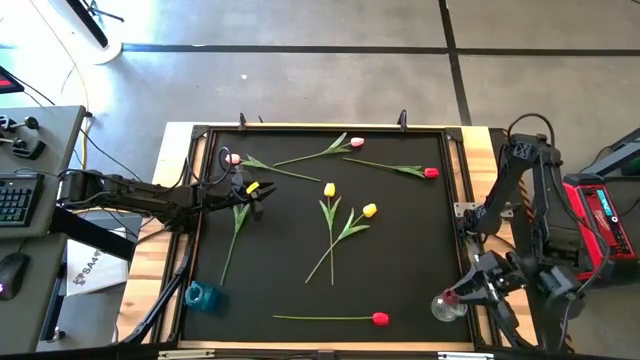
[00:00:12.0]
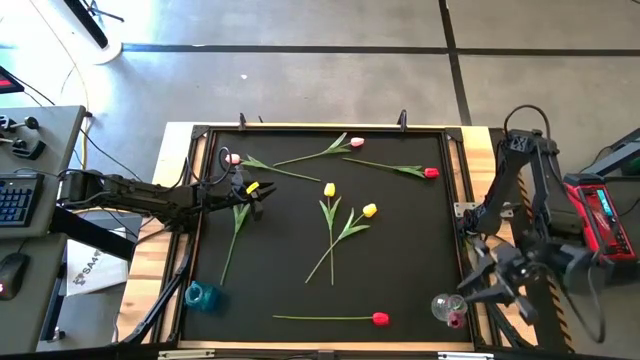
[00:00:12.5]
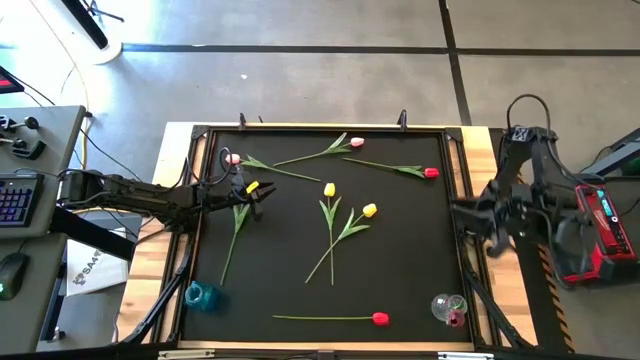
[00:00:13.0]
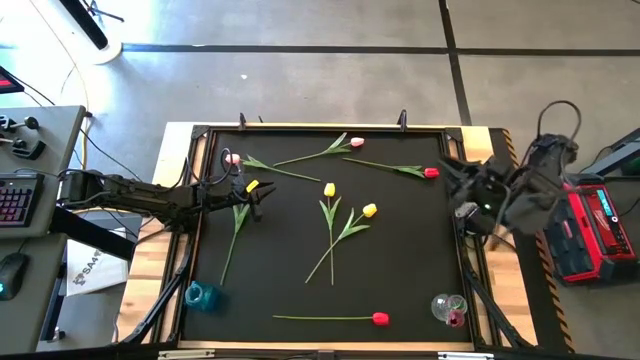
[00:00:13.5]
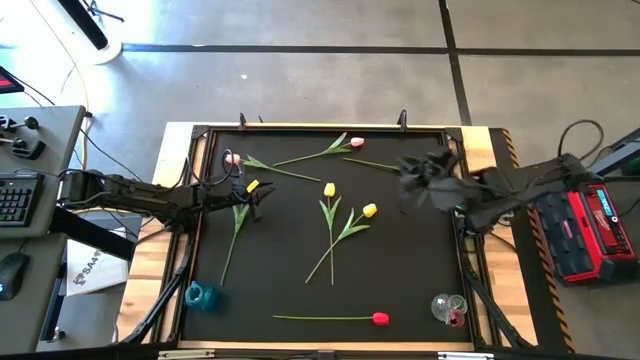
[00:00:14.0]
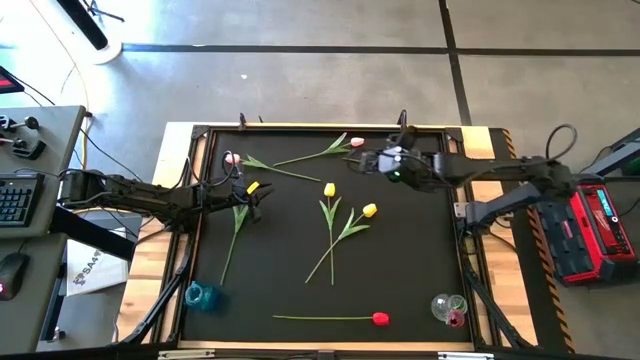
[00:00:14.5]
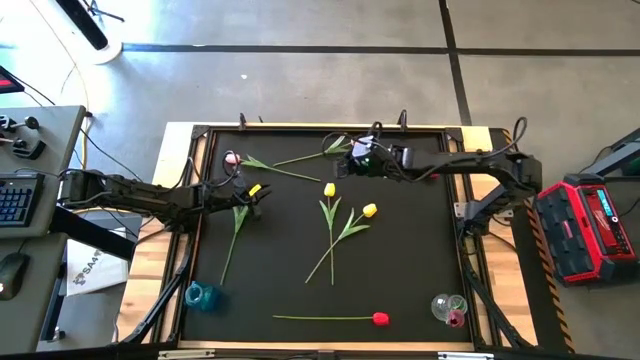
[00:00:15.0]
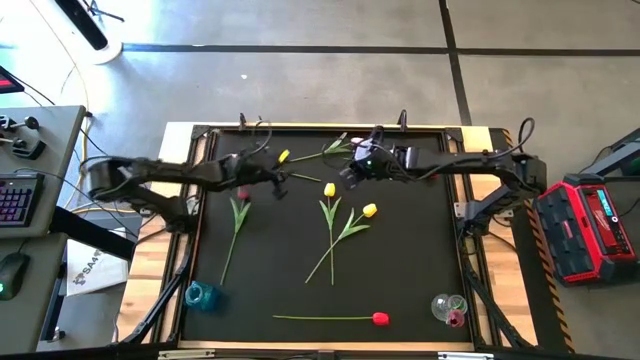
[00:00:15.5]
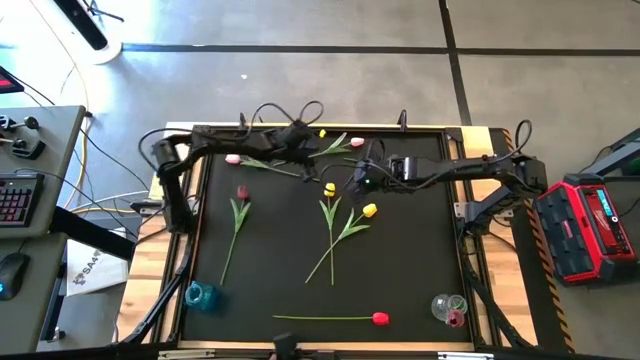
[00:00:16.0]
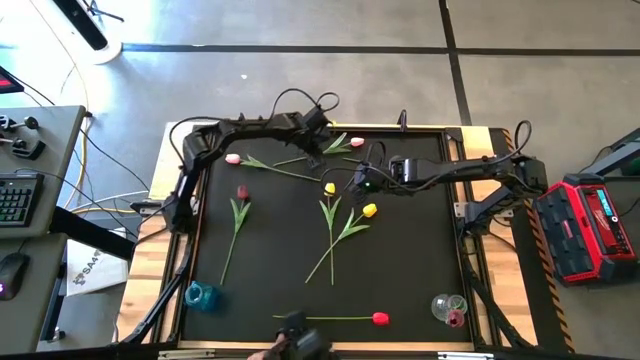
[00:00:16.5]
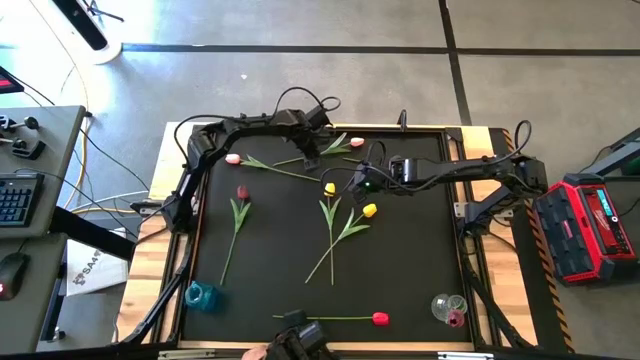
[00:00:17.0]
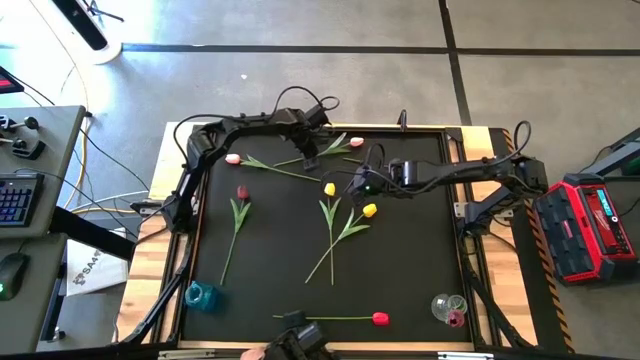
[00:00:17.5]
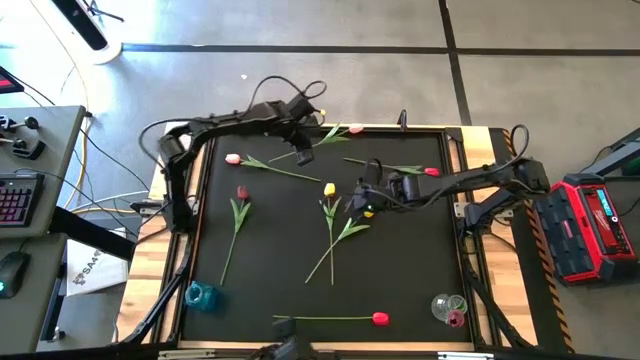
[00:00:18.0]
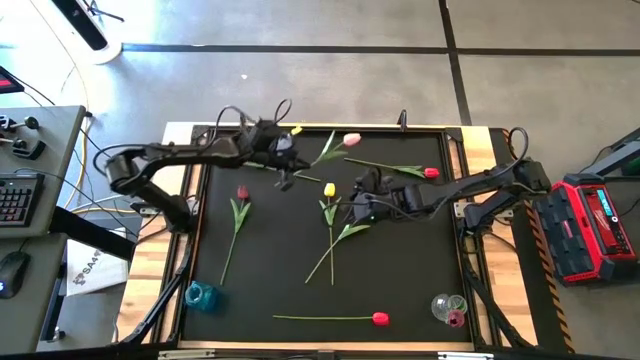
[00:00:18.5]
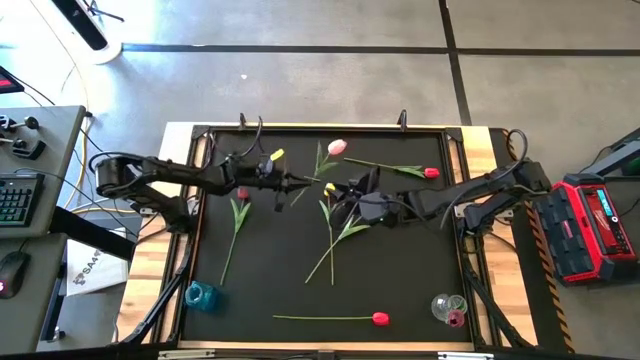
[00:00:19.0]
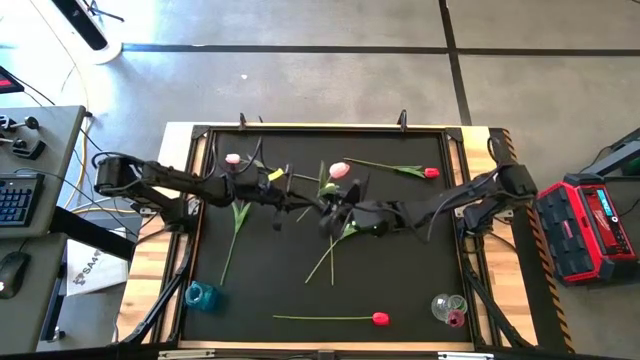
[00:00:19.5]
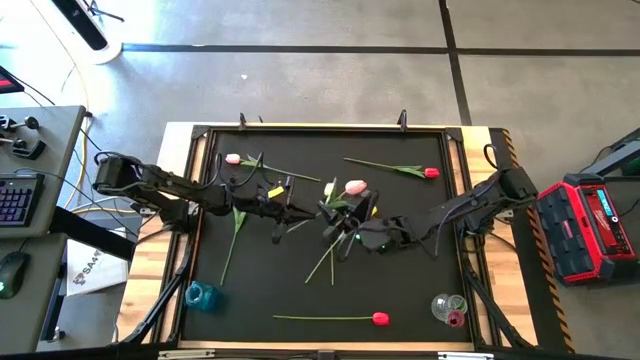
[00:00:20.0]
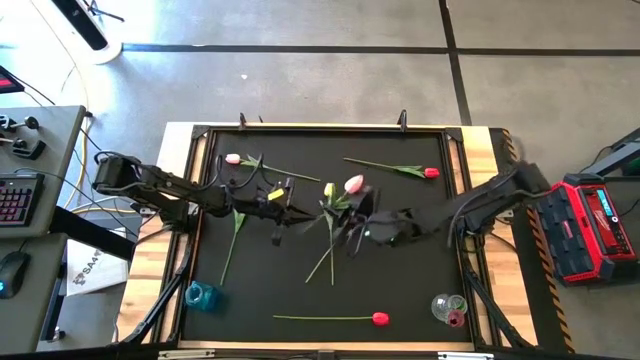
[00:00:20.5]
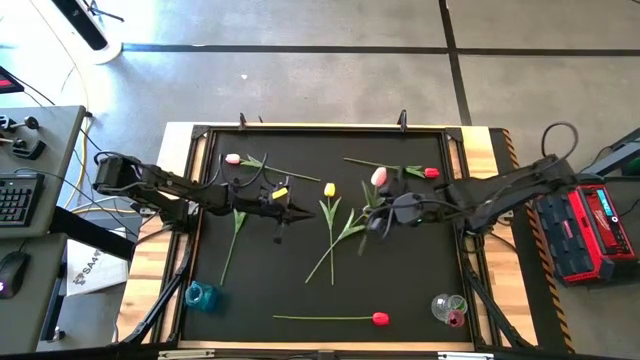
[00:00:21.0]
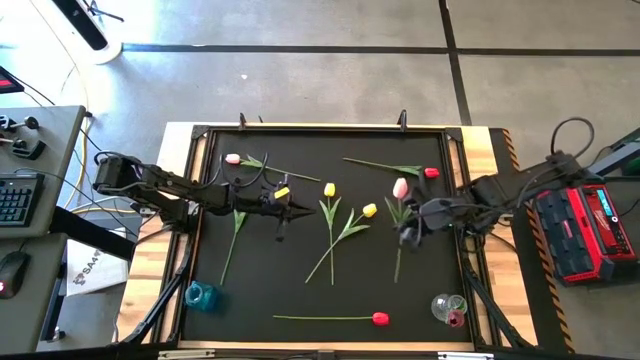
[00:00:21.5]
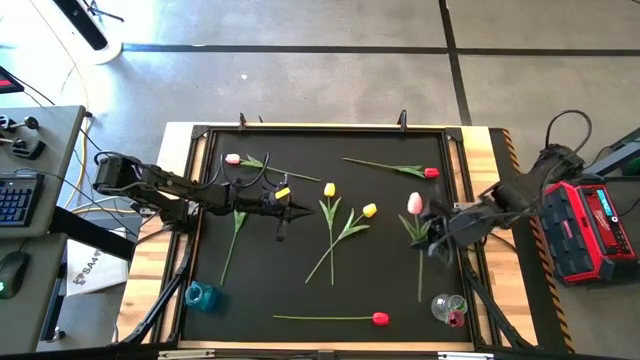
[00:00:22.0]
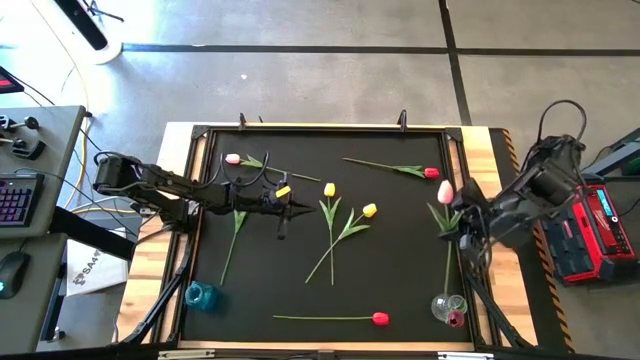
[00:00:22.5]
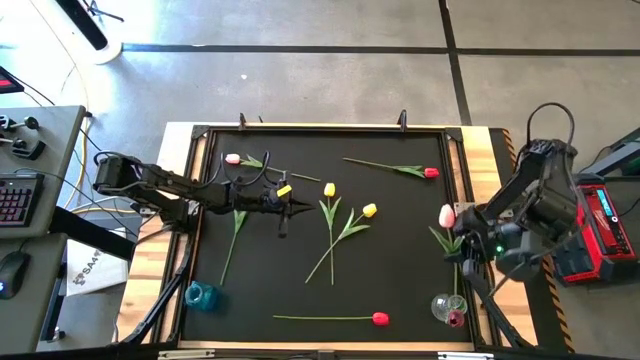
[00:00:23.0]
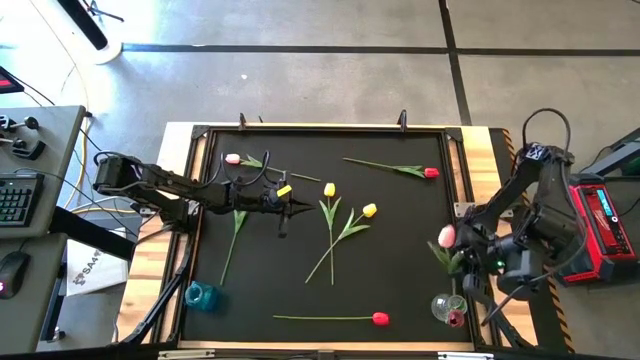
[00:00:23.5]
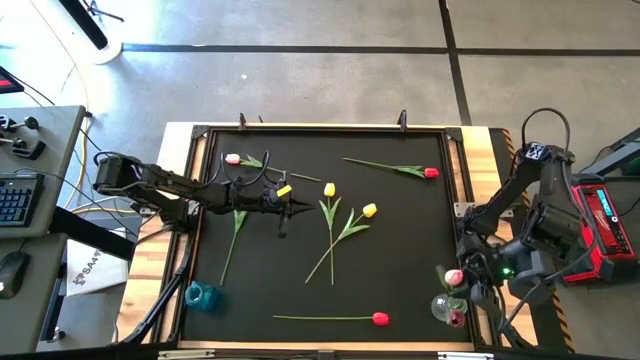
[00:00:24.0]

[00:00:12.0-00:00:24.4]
Task: Sort flowers into vase by color
Put the right pink flower into the transparent vase

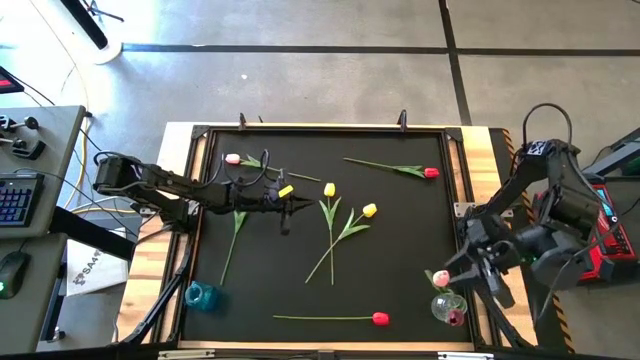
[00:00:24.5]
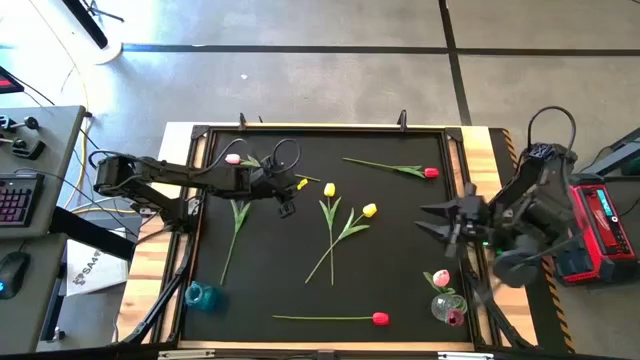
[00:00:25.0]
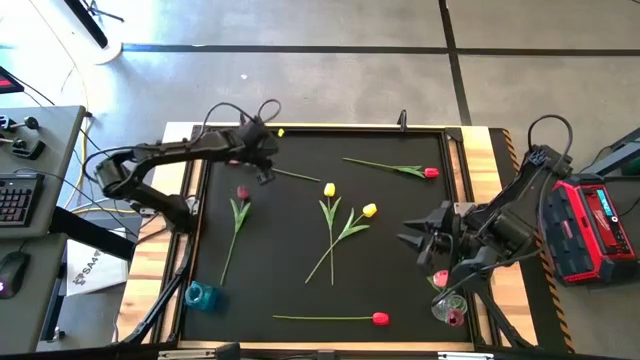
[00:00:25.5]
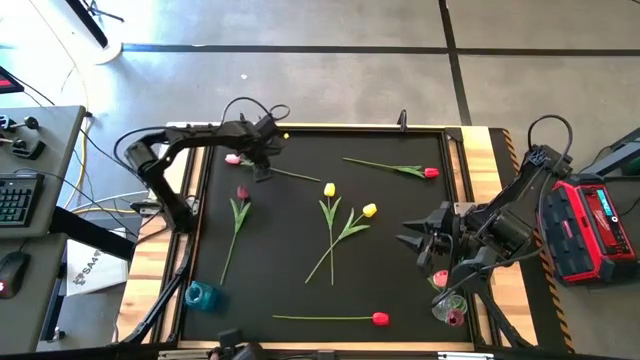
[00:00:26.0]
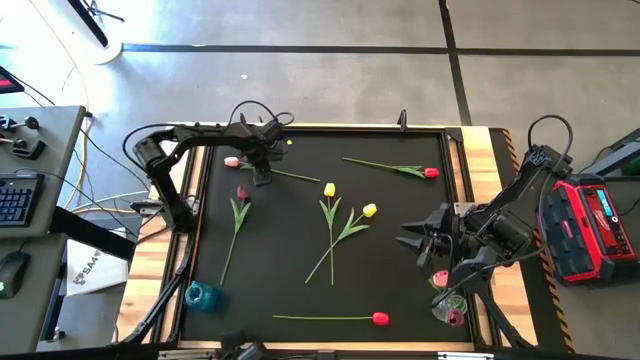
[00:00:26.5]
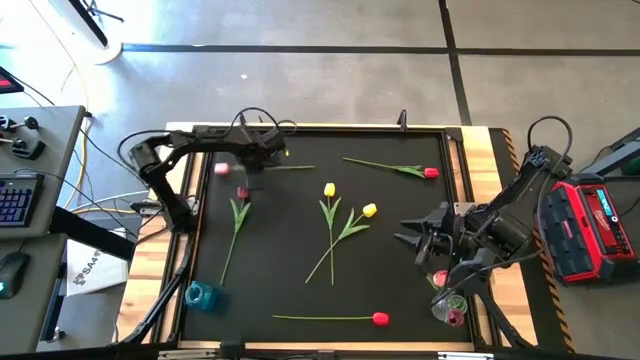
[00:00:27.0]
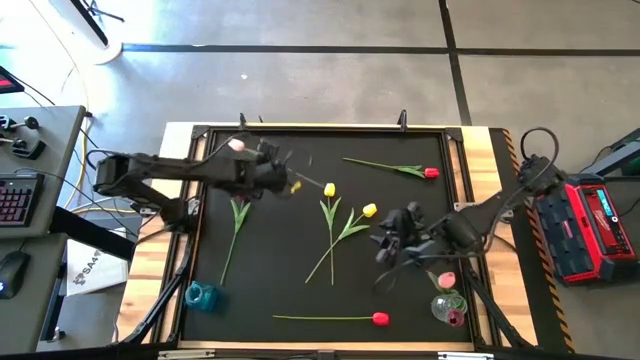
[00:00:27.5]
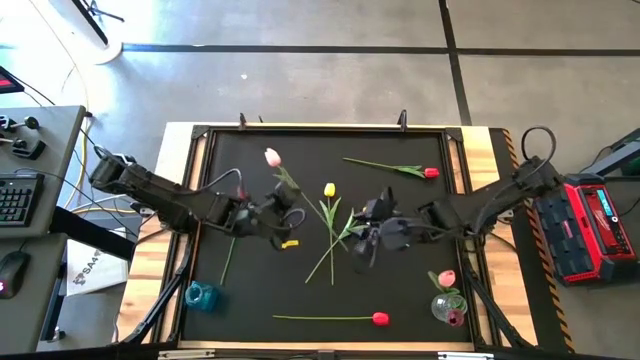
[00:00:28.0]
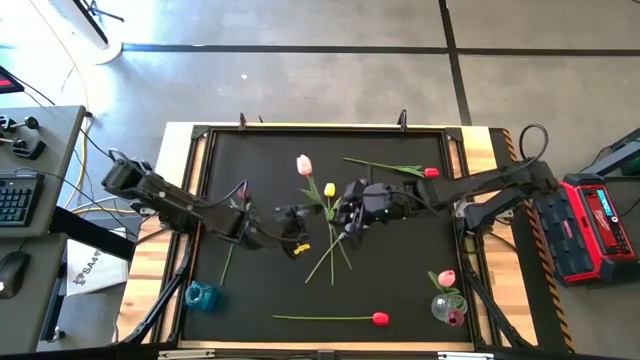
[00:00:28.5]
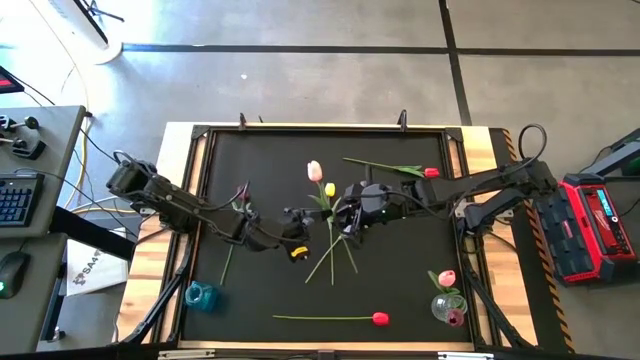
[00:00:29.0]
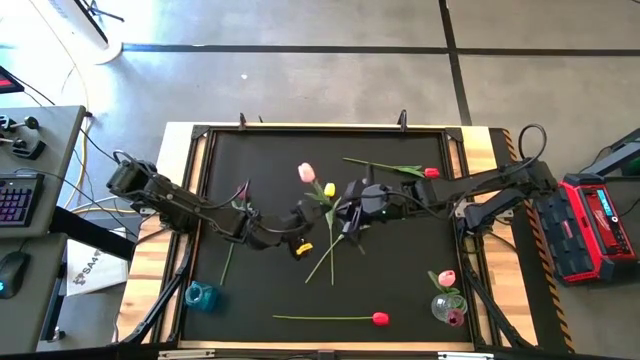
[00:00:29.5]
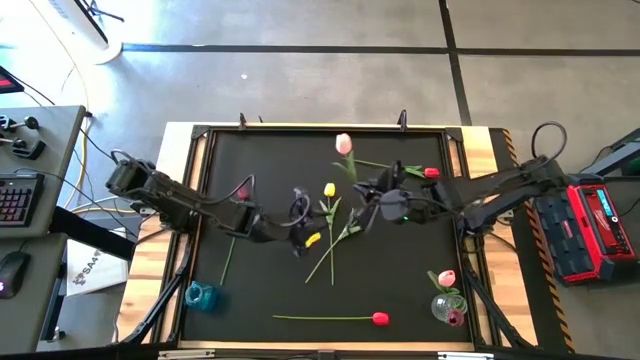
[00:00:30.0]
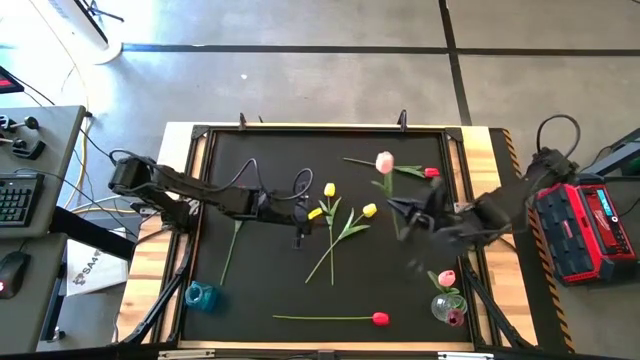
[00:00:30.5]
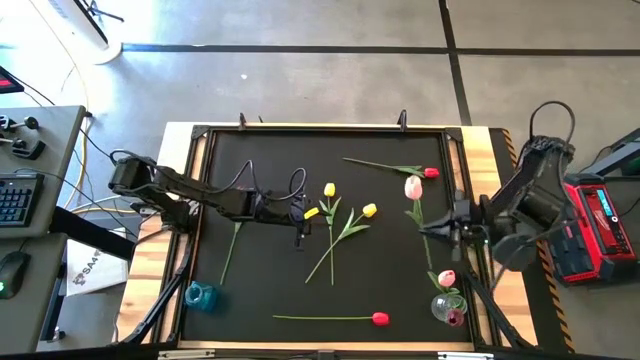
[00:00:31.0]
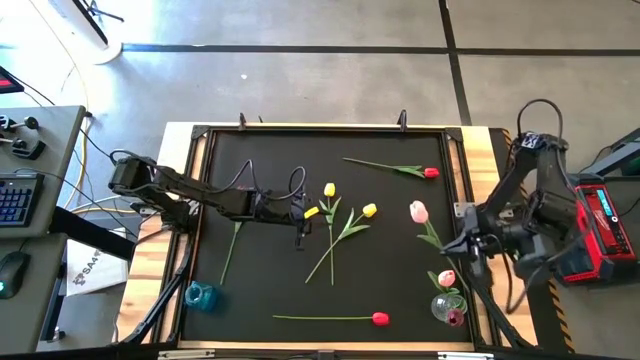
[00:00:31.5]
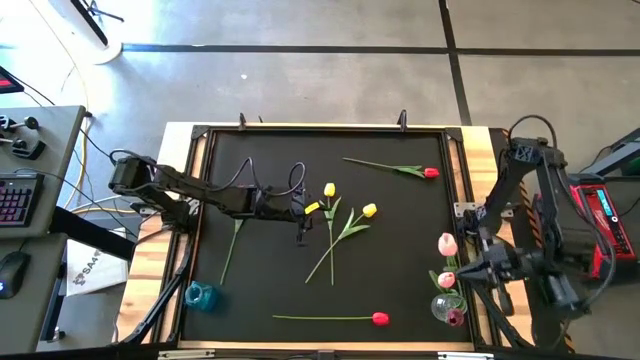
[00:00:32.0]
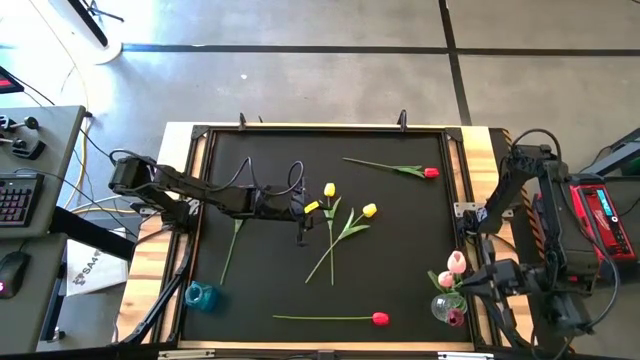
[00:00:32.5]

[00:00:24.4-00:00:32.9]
Put the pink flower into the transparent vase
